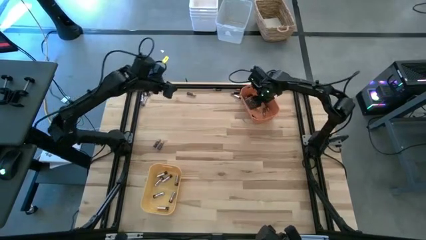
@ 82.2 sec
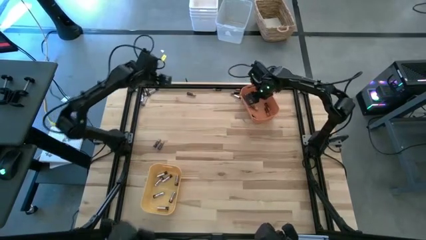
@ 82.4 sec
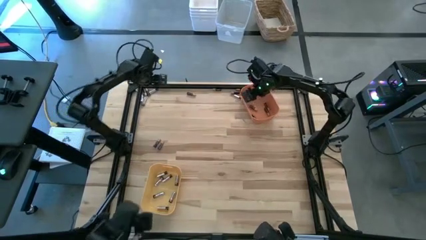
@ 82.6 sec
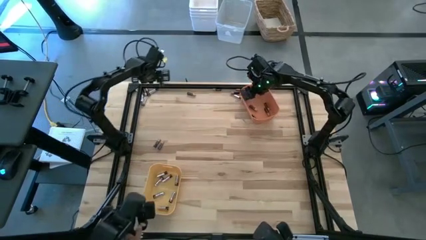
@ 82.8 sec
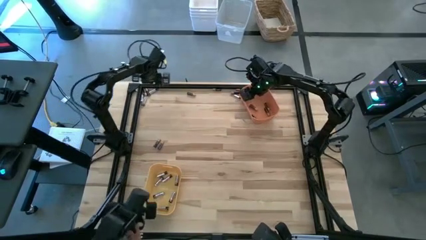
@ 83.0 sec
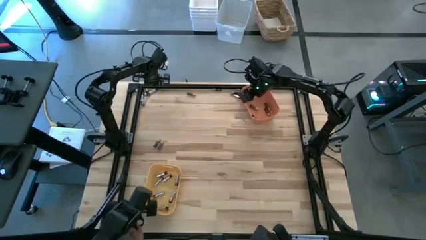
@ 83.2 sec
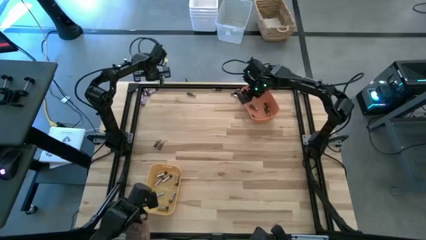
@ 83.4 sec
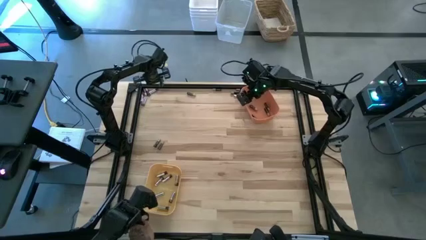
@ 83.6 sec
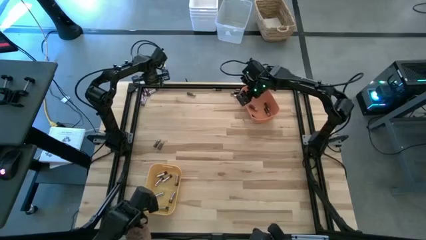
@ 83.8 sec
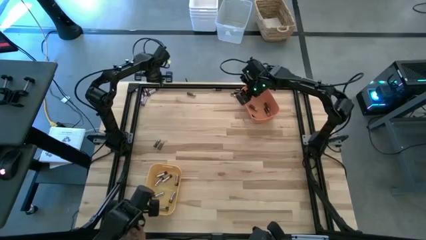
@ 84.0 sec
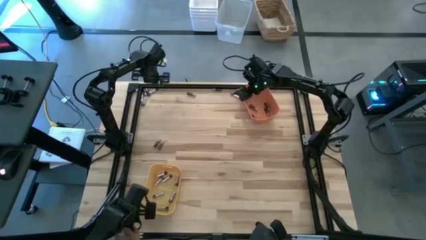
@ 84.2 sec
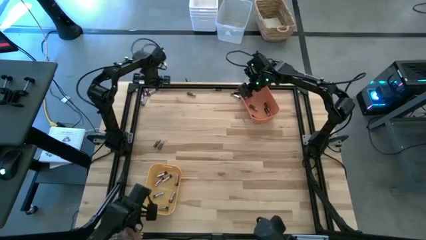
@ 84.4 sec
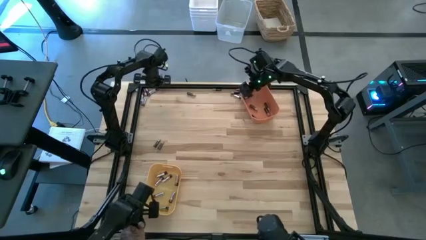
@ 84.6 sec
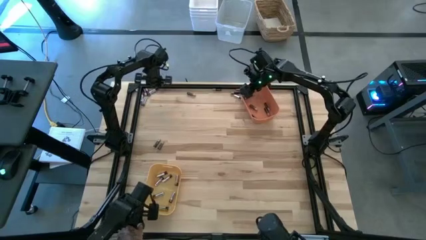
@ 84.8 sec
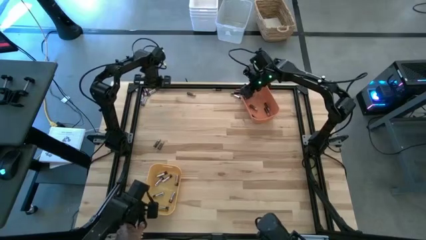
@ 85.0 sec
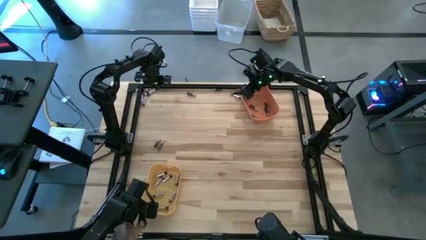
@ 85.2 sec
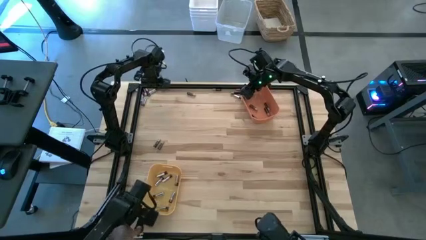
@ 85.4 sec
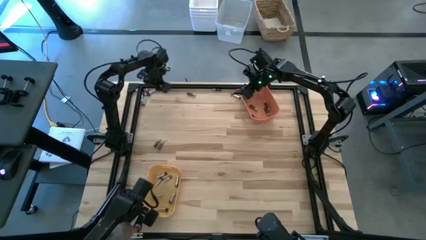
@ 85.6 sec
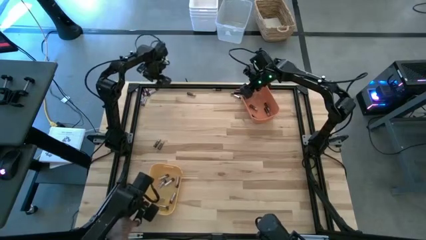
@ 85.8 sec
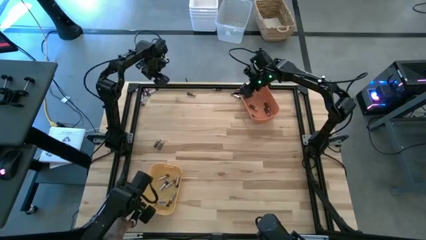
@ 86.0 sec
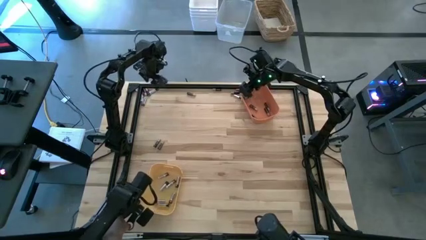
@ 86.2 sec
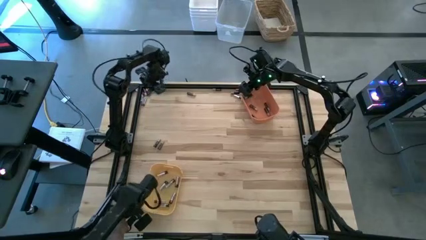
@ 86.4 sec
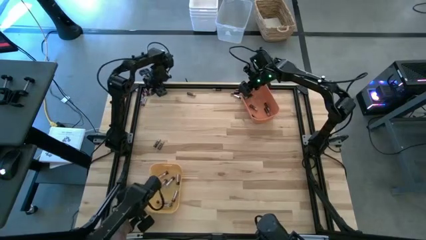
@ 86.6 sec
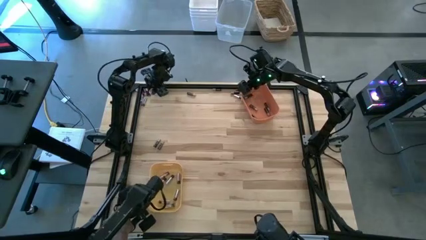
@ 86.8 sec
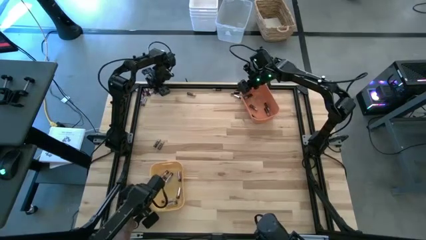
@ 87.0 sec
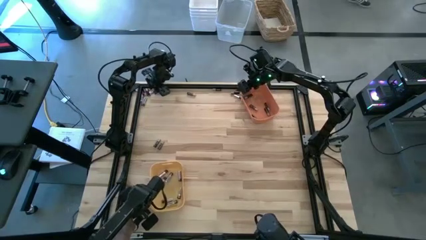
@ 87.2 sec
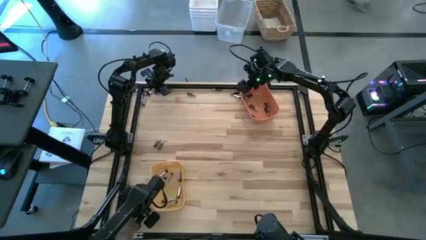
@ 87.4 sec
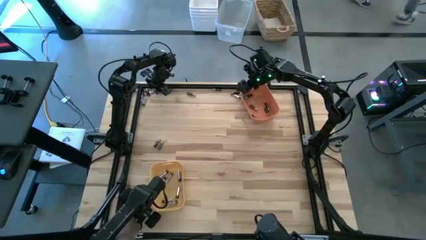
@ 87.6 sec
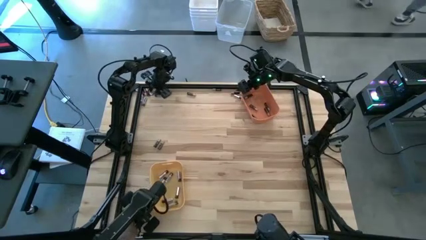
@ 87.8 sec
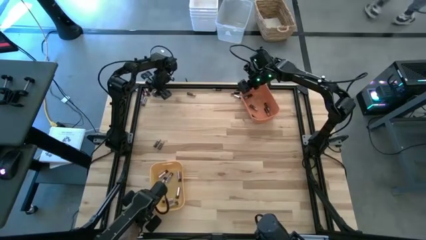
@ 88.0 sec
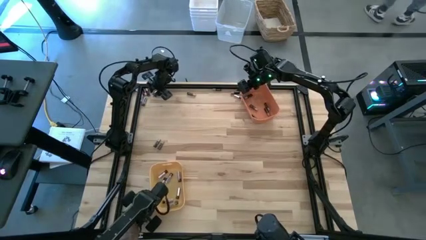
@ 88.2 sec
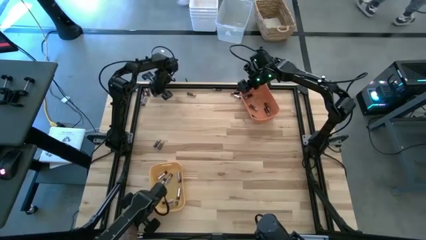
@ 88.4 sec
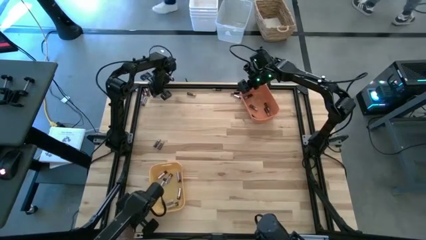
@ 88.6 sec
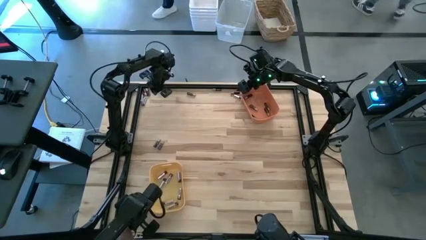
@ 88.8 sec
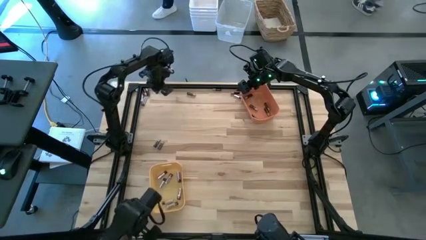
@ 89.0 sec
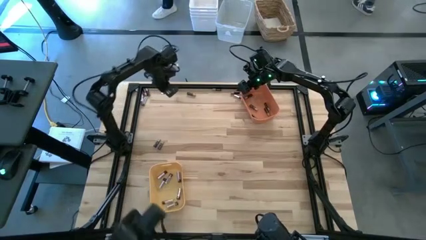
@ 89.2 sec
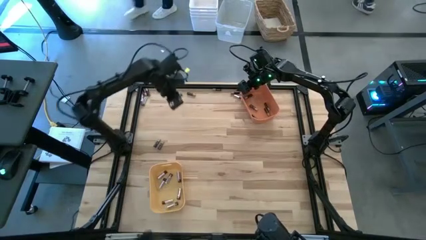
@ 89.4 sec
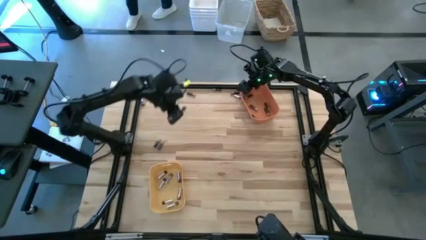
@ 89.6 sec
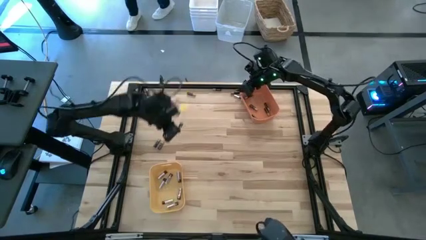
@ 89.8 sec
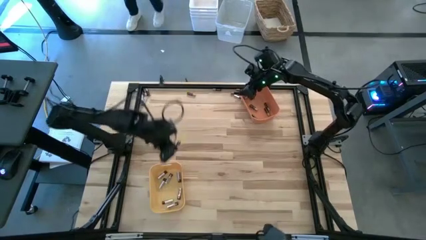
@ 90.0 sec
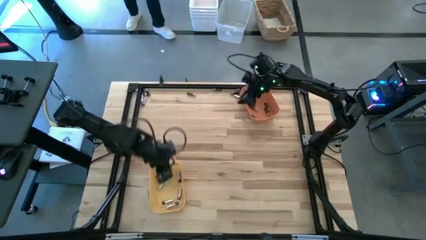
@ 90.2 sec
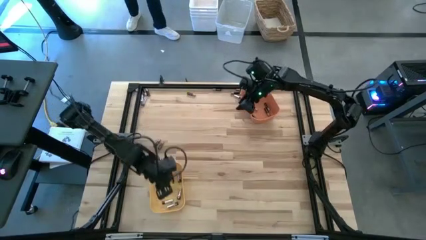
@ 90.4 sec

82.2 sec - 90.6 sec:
Task: Sort batteries
Put the silver battery into the yellow bin

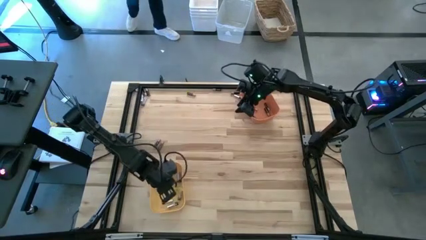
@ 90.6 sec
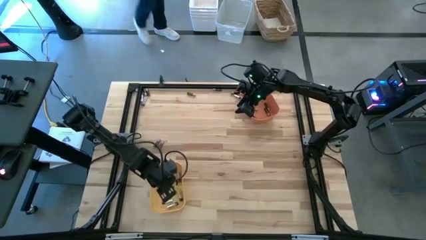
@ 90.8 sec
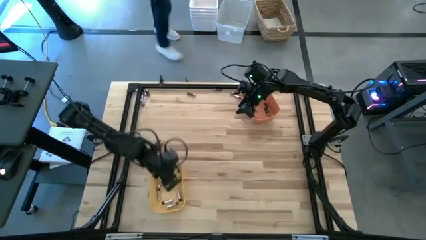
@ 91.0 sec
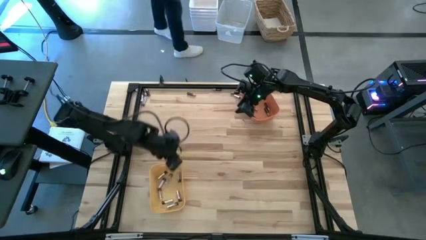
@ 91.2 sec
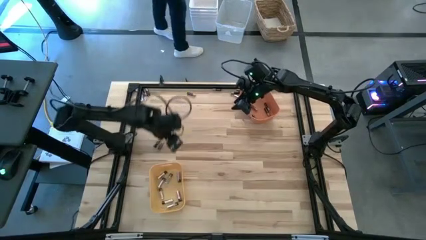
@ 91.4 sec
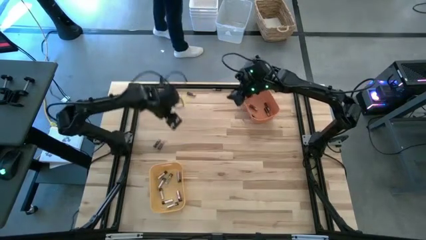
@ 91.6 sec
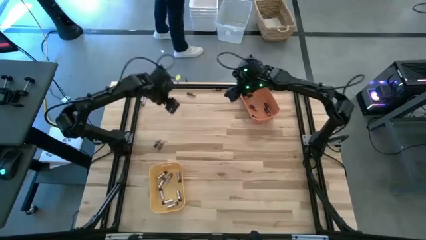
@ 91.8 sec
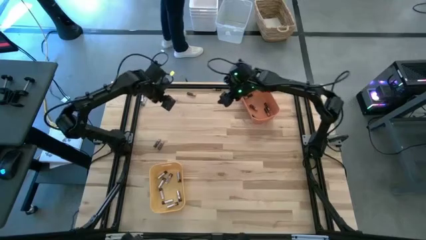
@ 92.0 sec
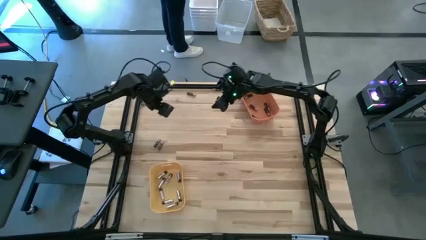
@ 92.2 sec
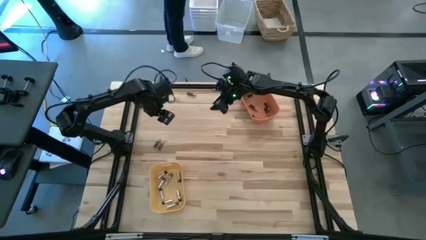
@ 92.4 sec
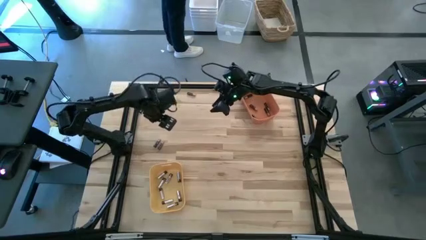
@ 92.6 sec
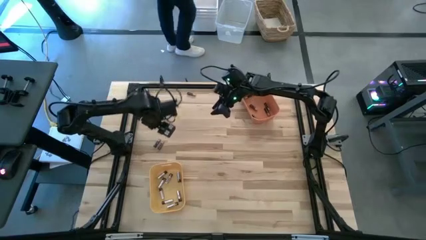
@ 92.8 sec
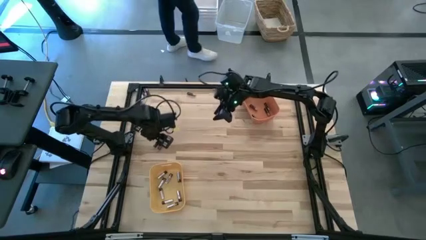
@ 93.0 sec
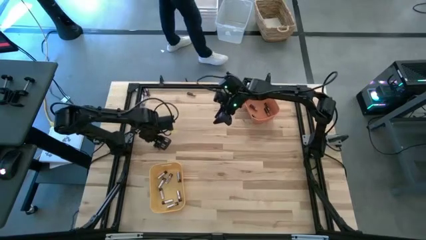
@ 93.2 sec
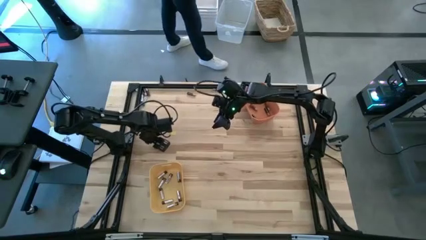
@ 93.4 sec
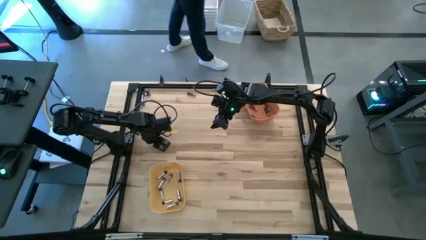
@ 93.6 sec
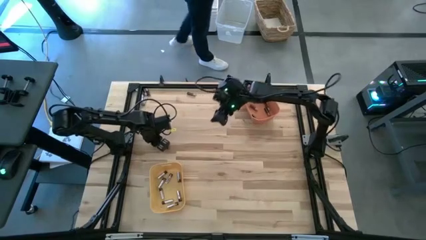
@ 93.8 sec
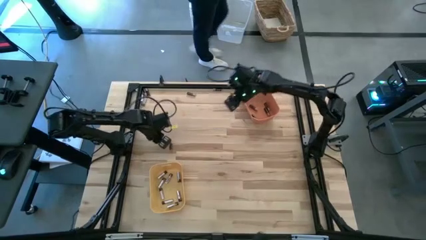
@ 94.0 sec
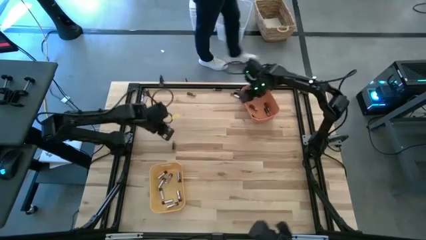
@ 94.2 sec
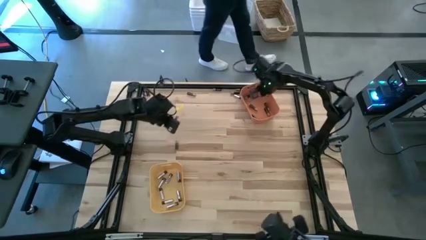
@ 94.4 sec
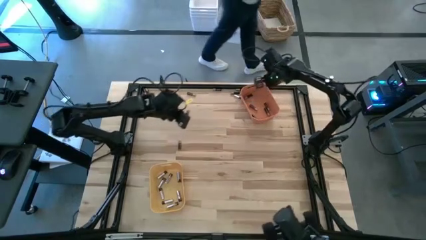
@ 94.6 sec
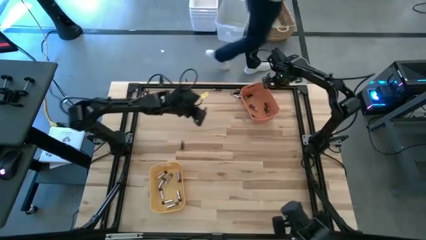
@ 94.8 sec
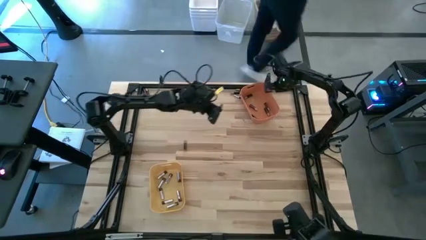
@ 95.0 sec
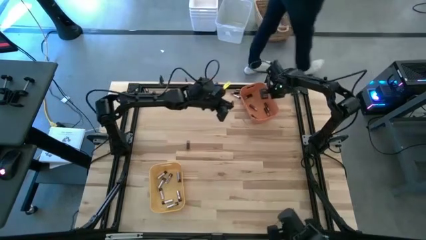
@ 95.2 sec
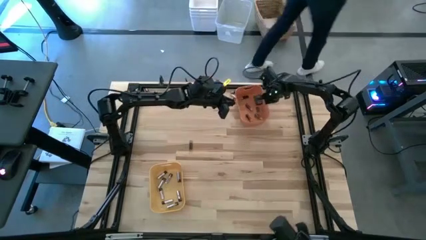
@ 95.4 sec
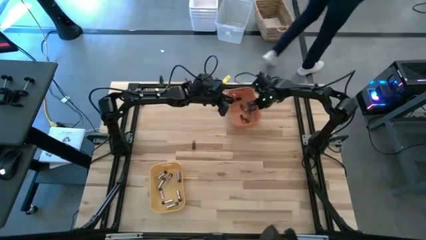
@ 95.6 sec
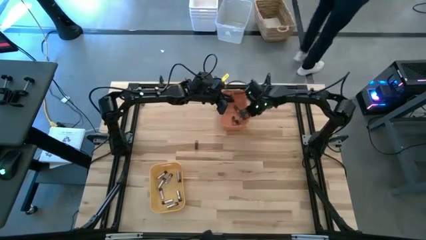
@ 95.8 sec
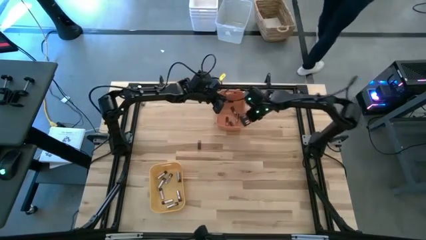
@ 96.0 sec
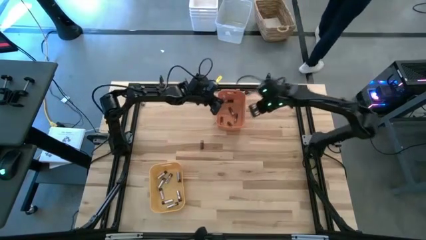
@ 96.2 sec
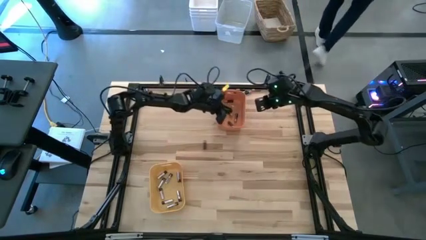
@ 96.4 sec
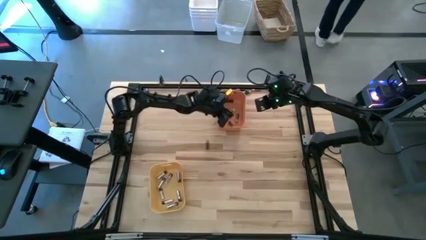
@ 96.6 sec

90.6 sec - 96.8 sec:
Put the black battery into the orange bin

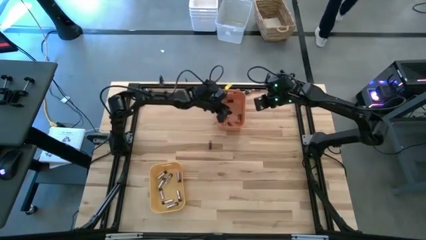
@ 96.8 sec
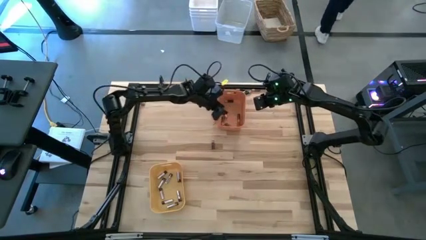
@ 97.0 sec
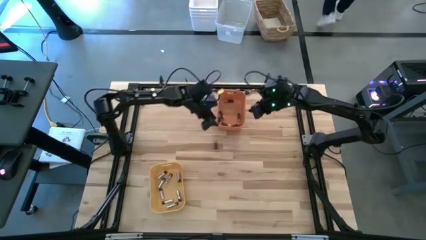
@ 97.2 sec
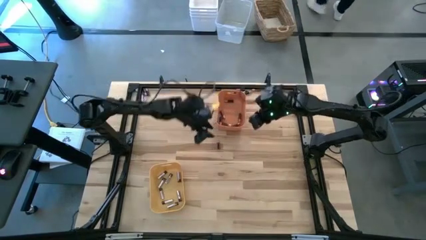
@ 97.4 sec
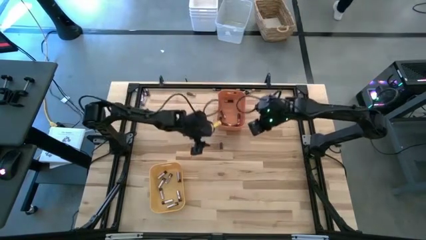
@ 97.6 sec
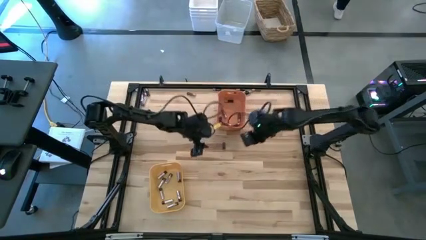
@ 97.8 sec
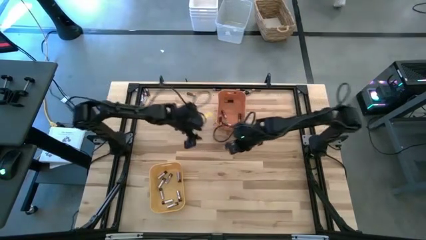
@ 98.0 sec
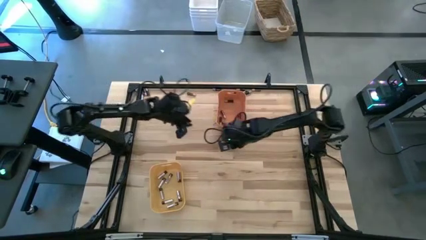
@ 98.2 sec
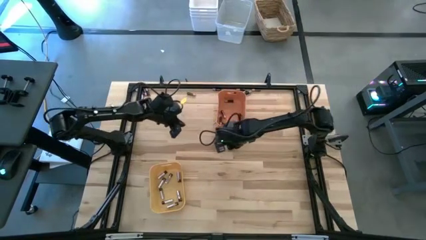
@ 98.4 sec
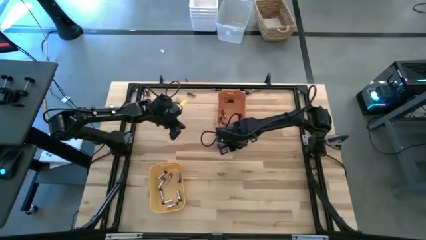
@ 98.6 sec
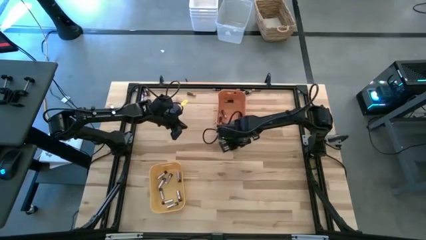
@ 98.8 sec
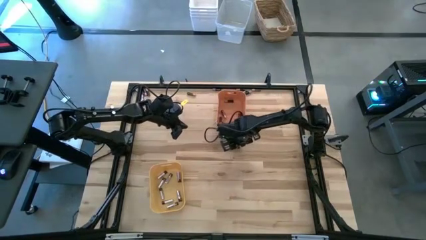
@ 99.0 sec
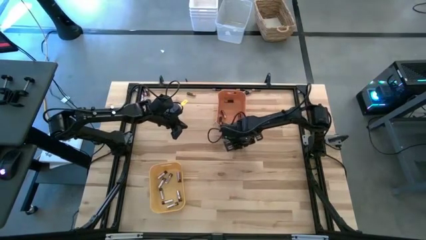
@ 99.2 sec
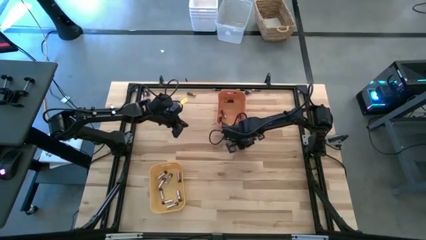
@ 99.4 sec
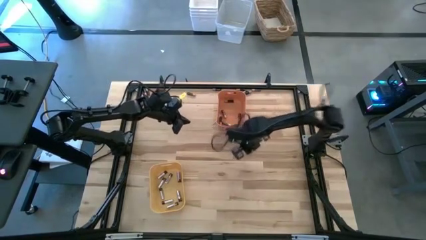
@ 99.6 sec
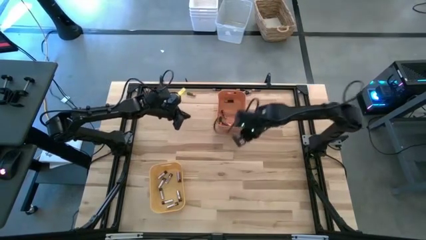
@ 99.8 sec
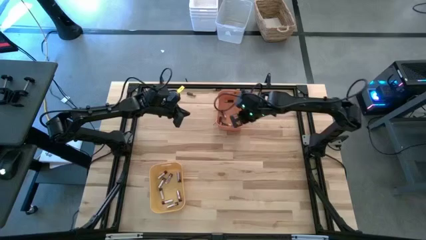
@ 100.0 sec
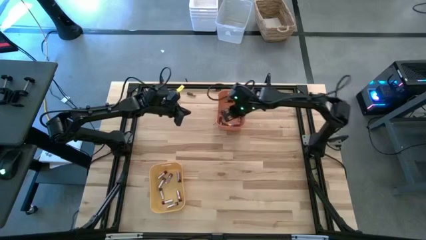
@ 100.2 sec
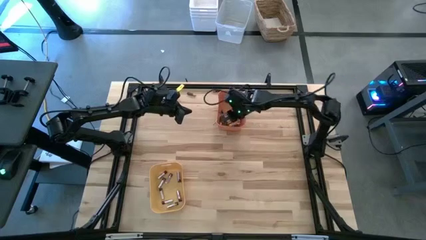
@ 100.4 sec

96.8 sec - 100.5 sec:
Put the black battery into the orange bin
